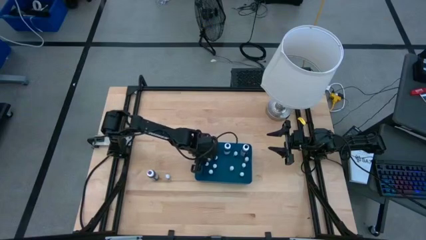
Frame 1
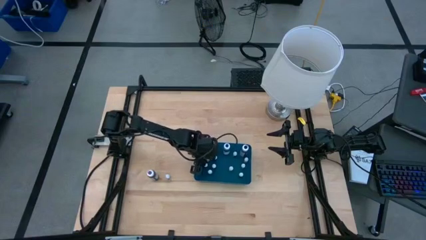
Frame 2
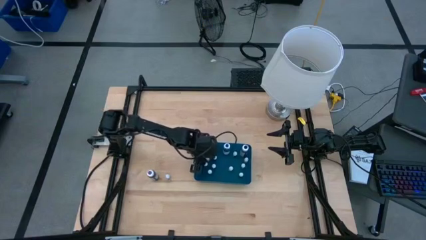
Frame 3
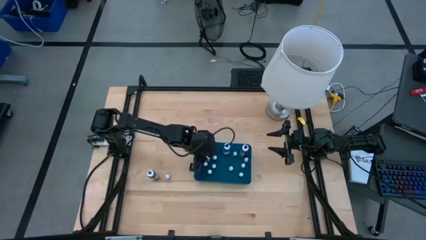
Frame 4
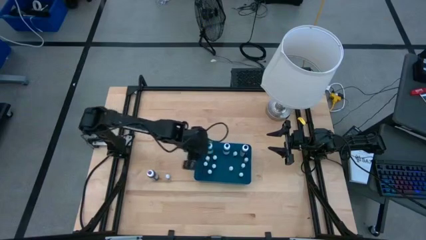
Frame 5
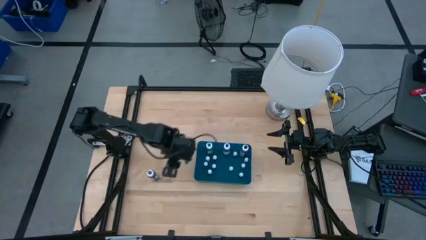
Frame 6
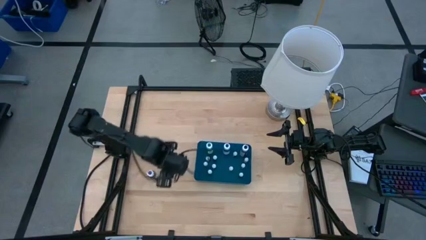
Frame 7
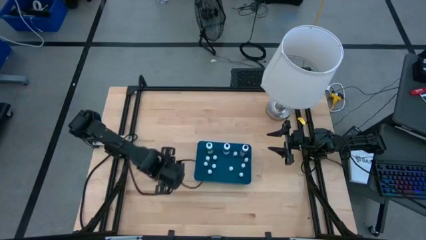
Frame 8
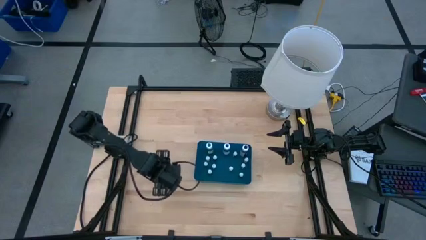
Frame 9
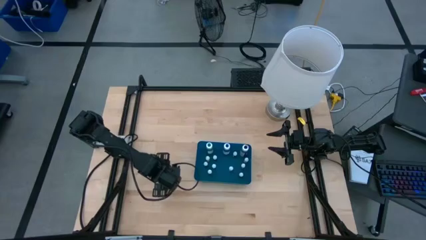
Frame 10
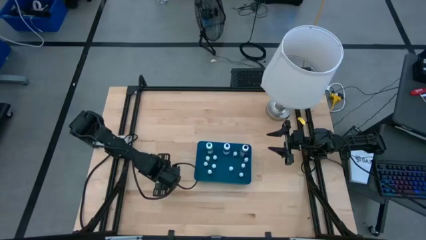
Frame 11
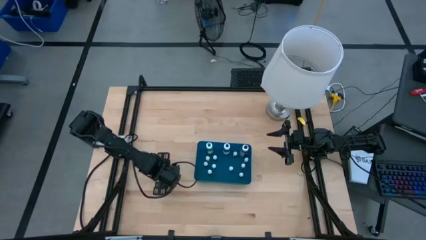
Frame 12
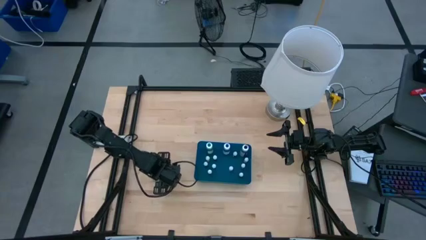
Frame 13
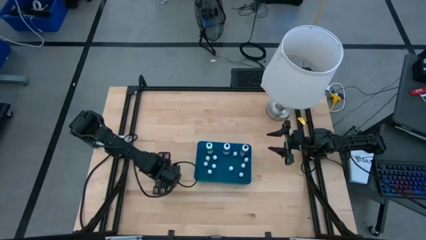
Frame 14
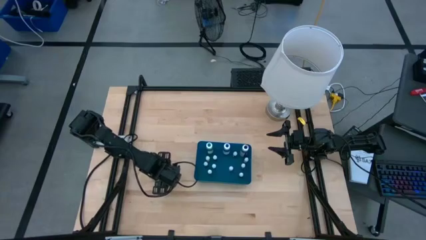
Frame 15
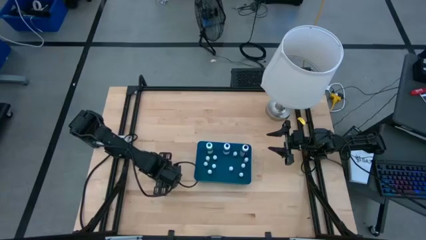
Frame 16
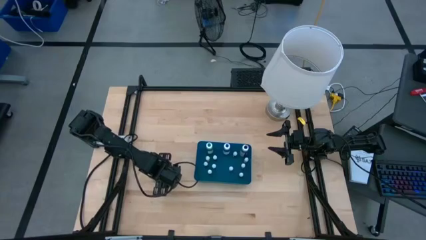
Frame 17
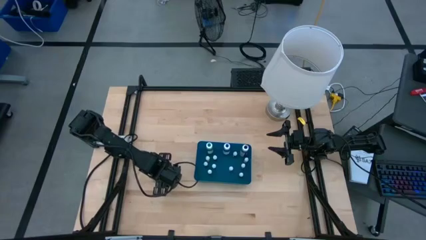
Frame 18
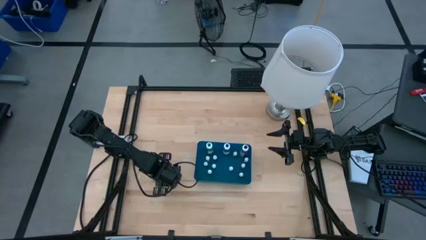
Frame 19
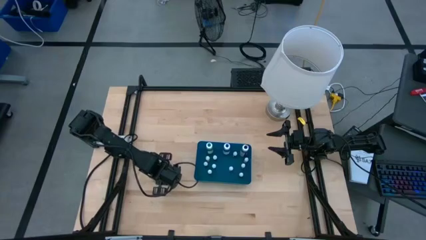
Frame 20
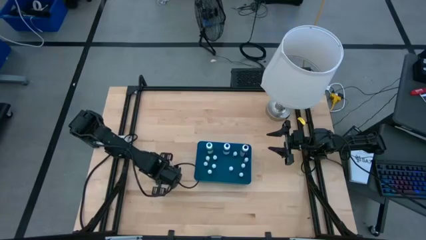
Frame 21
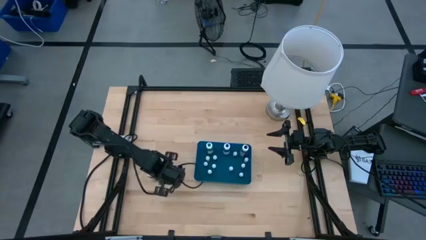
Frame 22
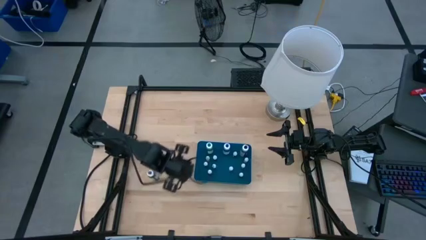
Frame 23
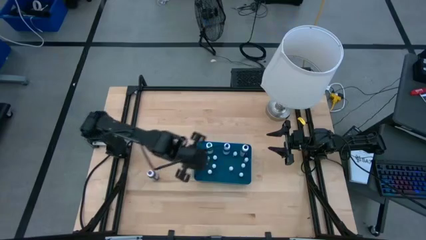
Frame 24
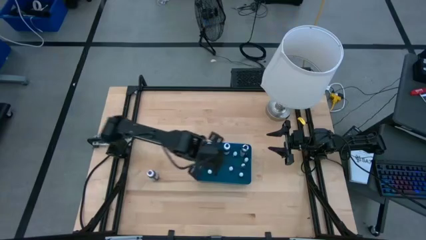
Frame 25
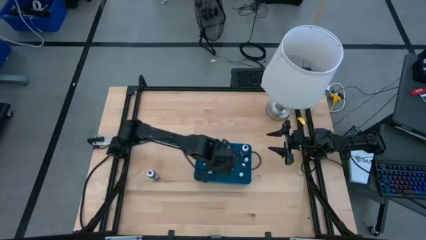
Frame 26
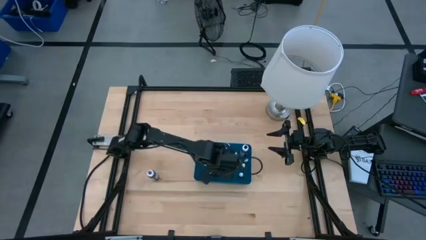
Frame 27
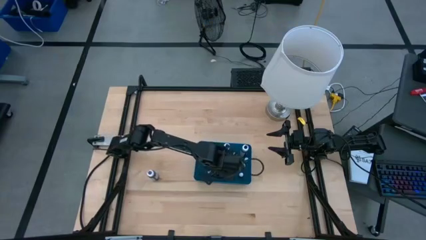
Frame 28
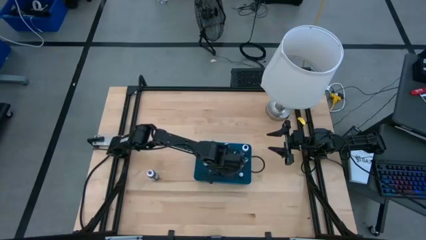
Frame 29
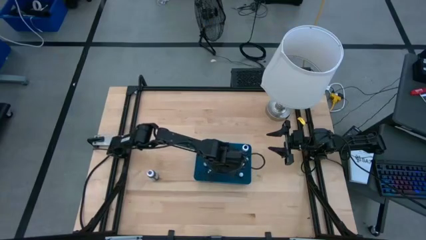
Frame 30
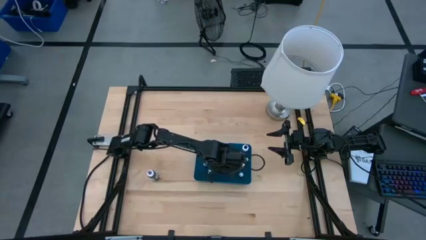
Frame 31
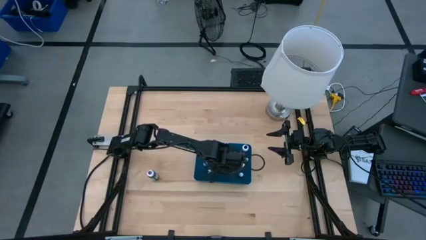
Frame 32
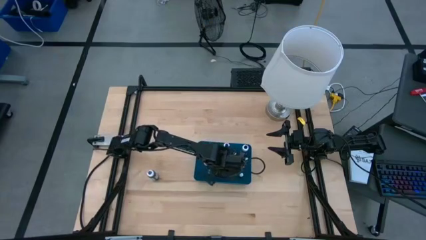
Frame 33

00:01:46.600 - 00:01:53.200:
Task: Pick & Place food coloring
Put the small black food coloring bottle into the blue bin

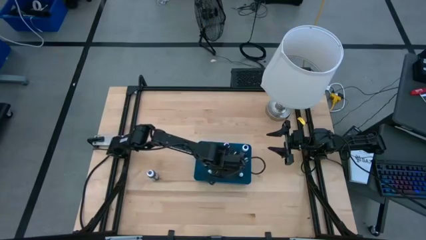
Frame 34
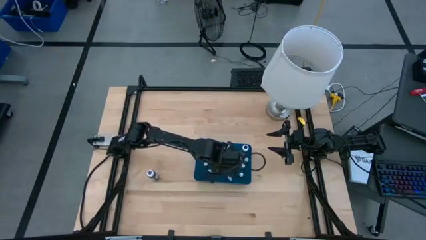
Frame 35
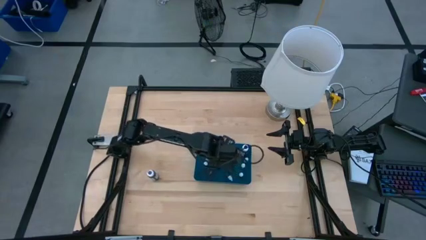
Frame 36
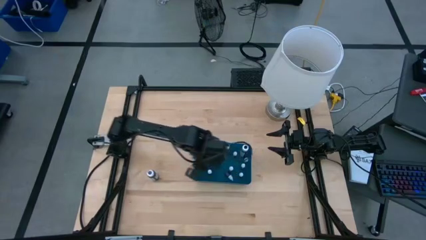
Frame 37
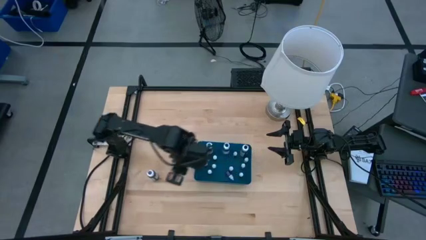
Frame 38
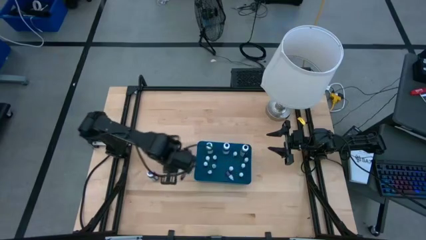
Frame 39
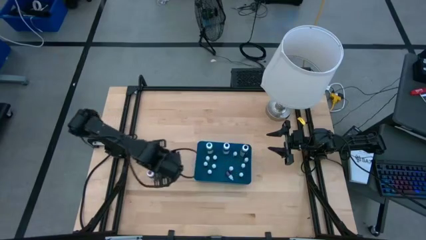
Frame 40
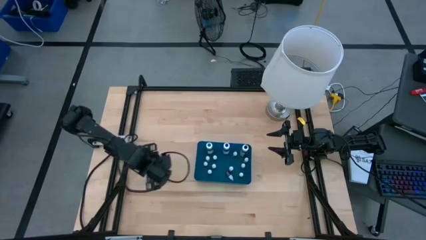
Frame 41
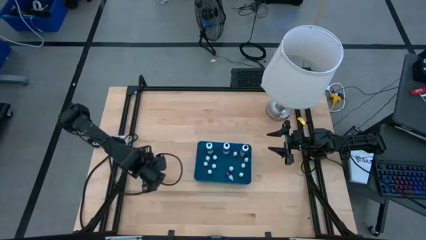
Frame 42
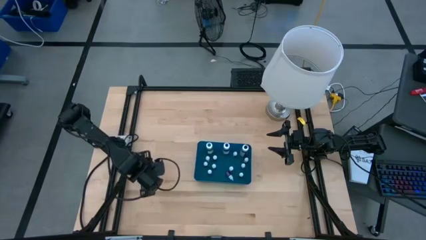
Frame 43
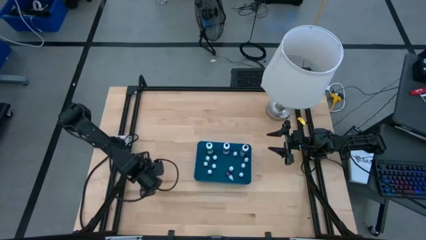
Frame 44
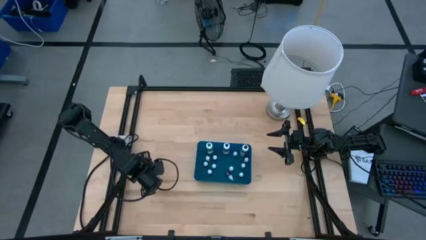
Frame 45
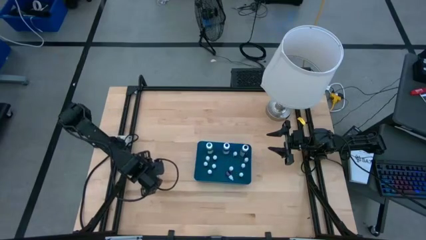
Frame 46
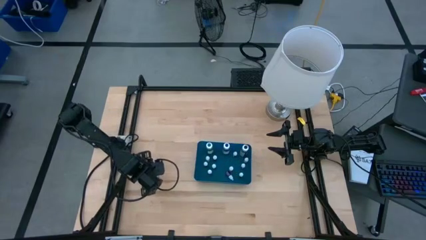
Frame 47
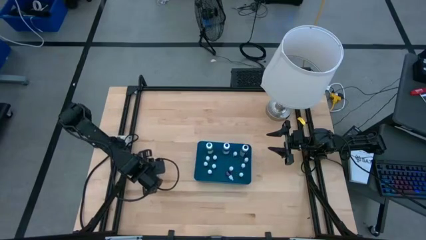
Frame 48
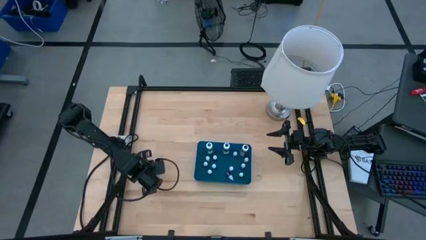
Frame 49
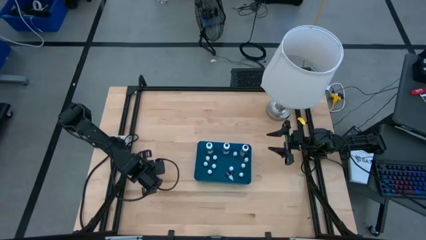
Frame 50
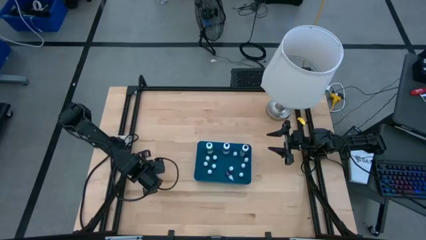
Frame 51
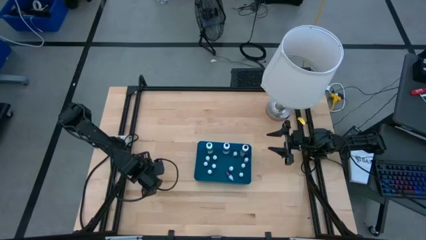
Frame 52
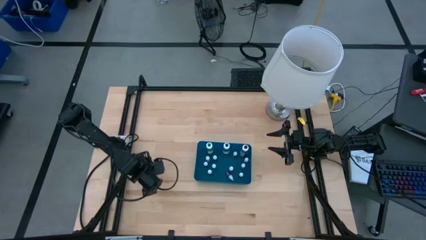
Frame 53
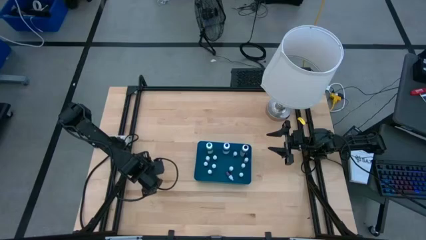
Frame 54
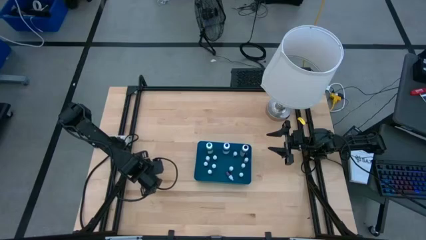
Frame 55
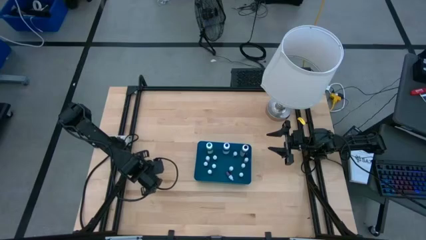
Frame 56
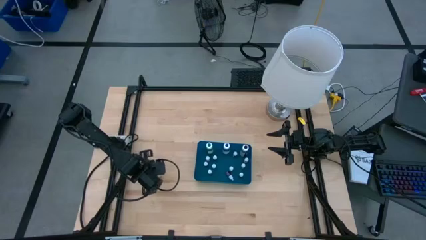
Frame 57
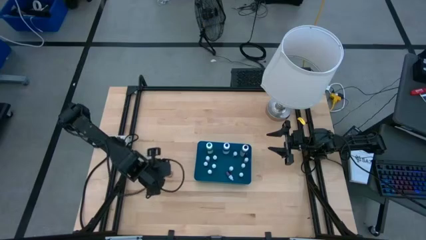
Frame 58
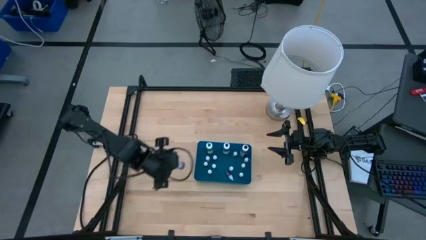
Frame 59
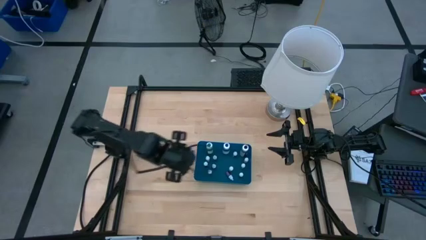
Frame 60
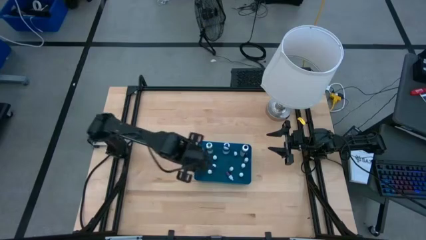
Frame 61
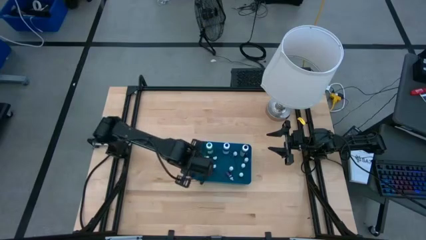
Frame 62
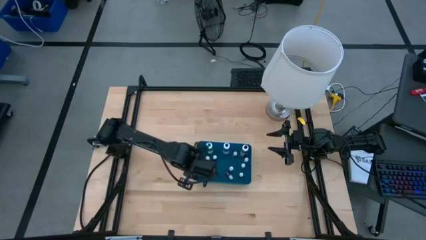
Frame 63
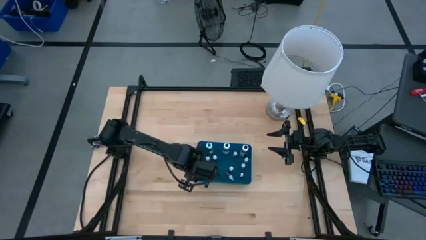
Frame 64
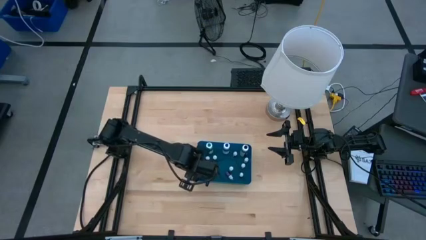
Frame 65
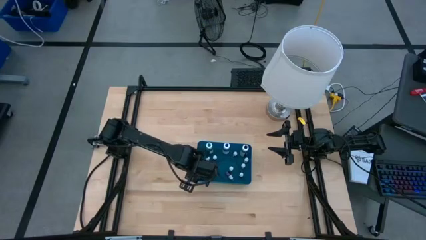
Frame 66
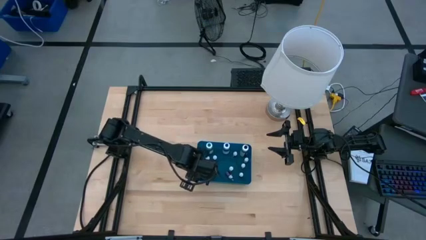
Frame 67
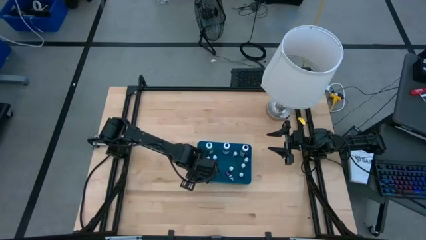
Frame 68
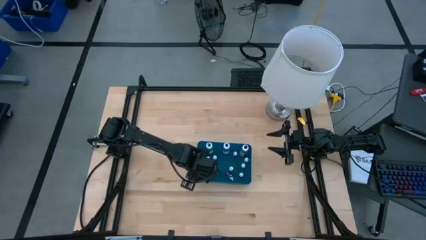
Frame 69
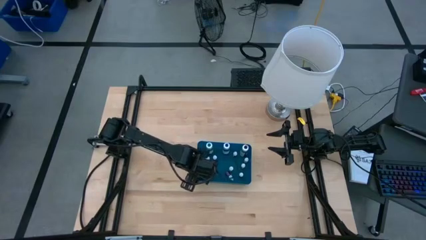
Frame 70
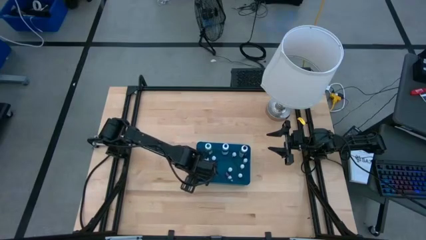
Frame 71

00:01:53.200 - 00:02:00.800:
Put the big purple food coloring bottle into the blue bin
